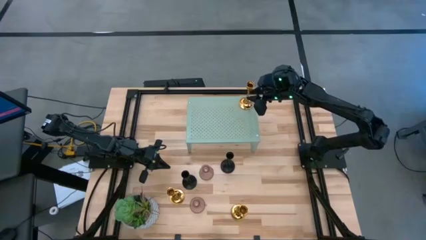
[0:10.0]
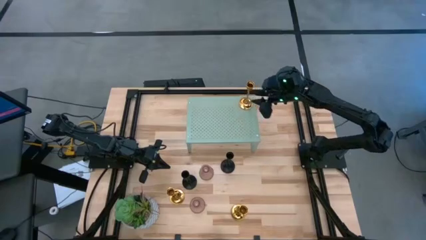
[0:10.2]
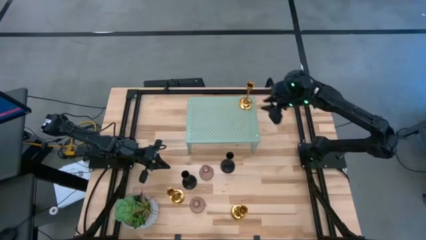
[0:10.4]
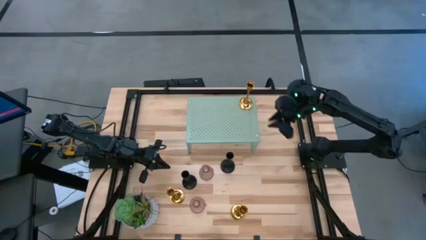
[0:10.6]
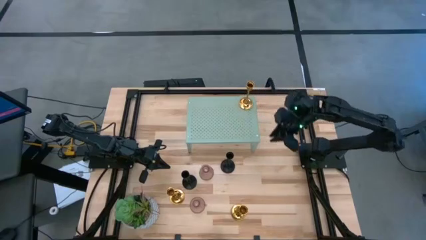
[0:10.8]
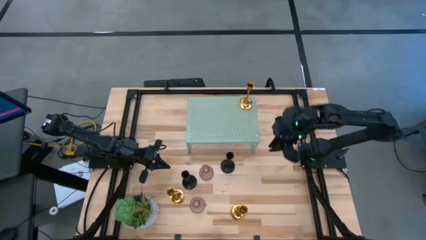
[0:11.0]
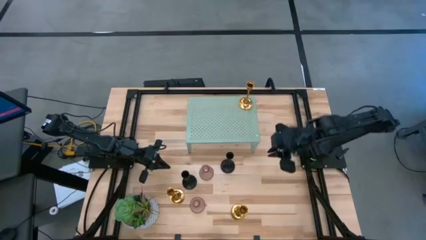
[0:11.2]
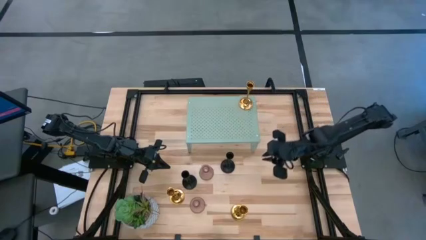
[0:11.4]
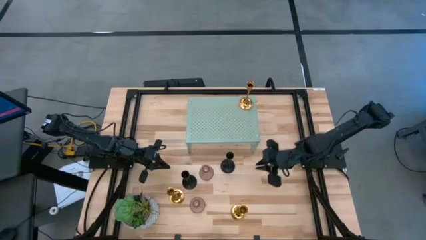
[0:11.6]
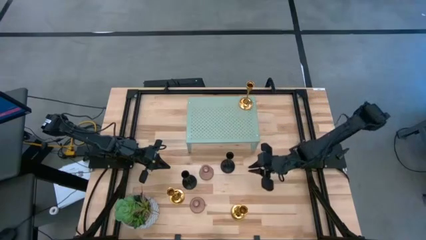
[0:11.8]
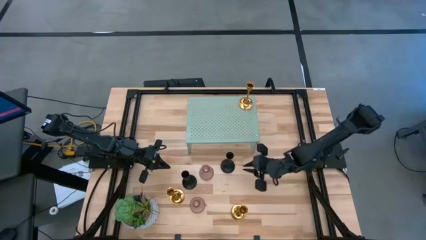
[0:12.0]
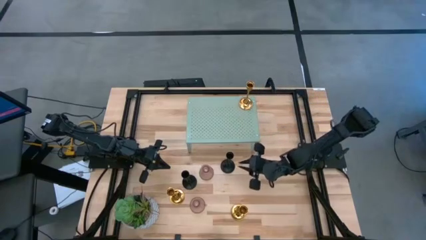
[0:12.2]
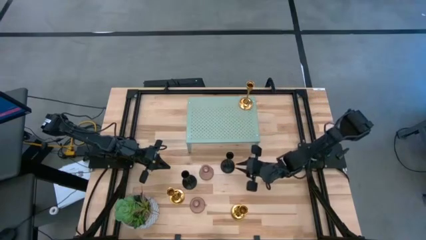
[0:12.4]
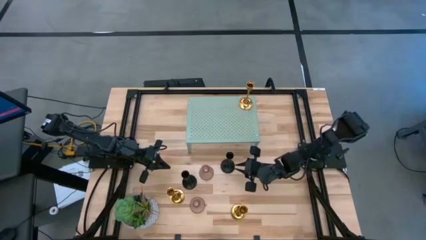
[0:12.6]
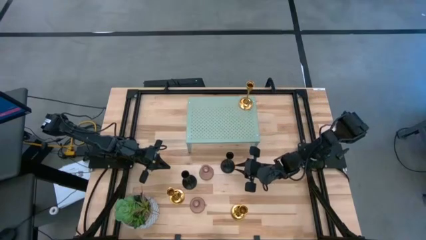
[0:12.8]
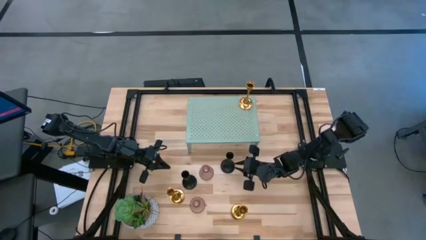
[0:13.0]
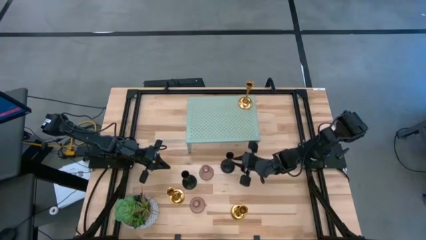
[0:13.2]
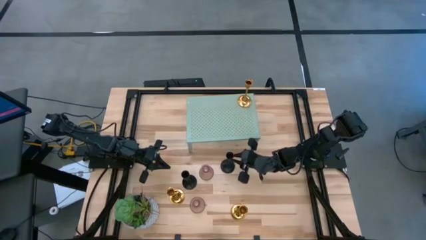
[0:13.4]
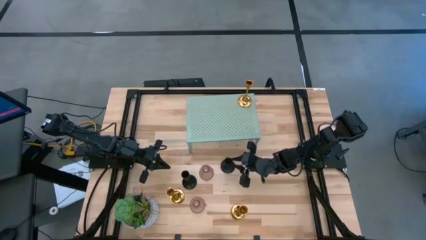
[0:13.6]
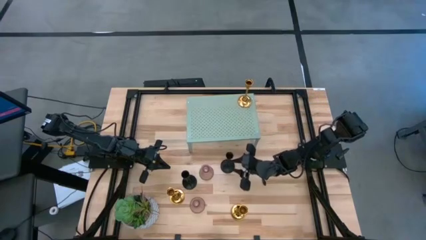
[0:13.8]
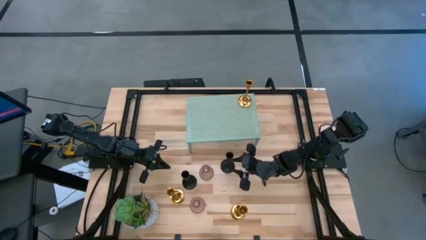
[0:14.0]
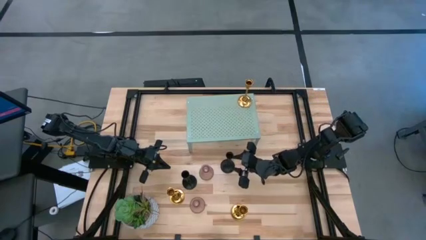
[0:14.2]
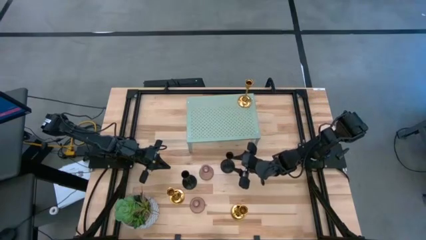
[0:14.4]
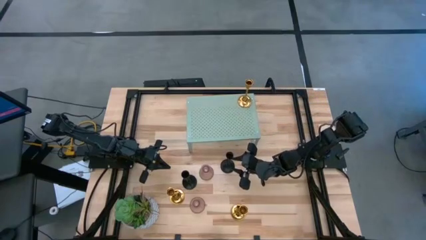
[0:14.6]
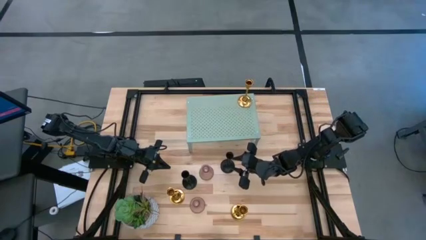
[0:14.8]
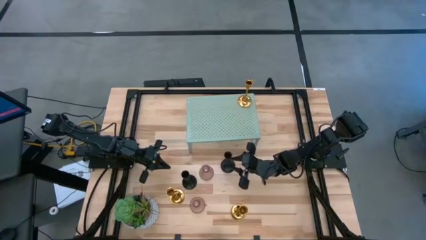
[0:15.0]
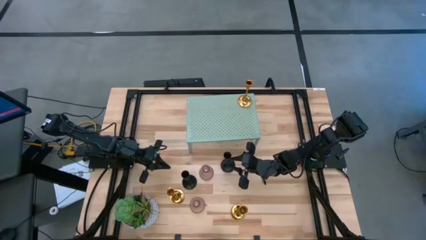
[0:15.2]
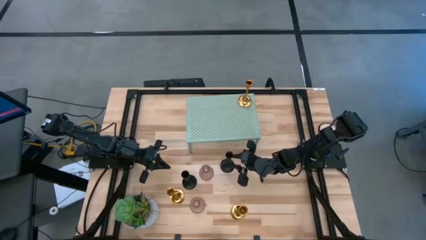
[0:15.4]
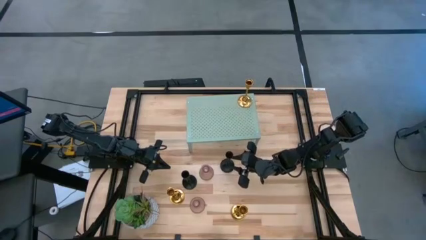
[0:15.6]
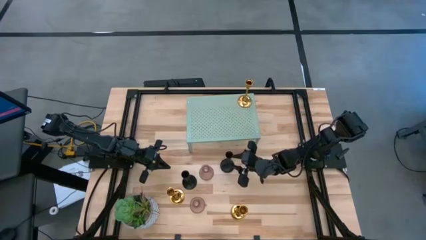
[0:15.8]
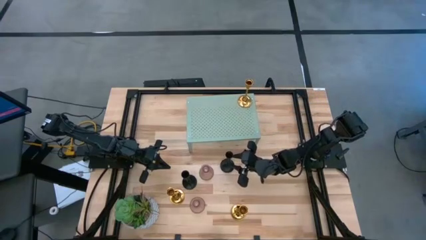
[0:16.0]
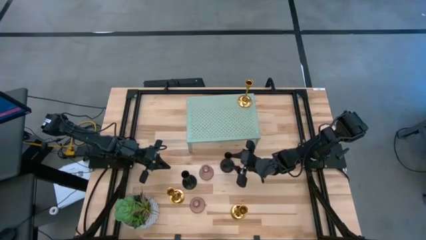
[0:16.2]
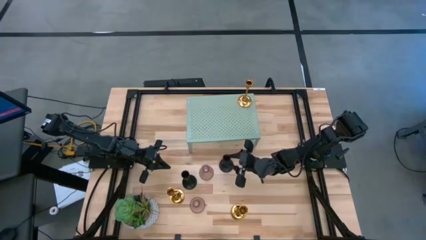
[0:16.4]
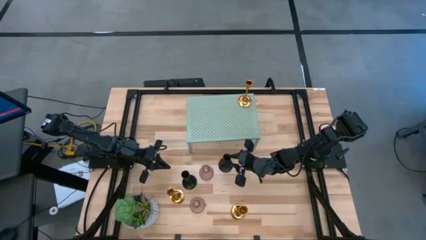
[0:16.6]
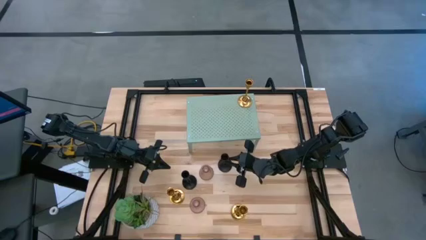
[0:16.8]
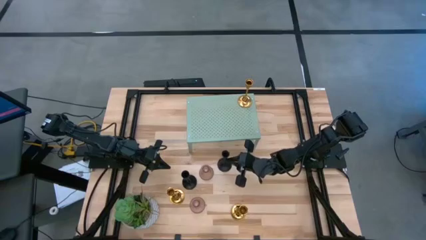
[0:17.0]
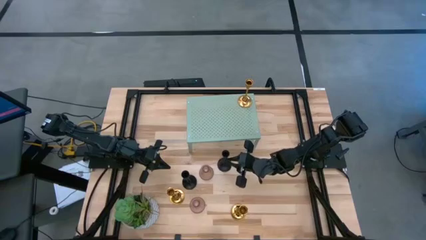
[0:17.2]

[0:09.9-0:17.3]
Task: Pick & Place candle stick holders
Put the top black candle holder on the shelf

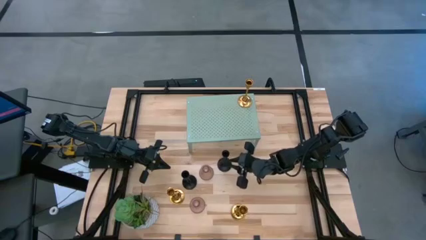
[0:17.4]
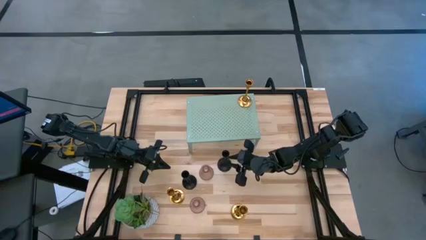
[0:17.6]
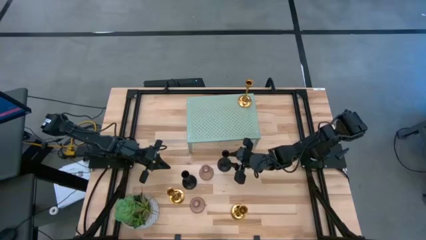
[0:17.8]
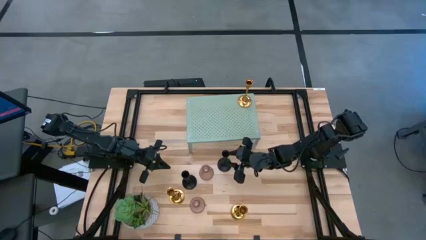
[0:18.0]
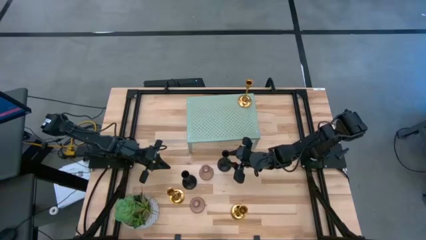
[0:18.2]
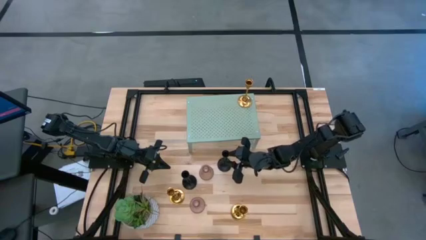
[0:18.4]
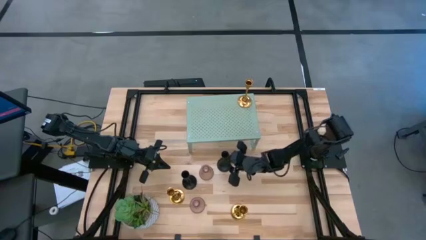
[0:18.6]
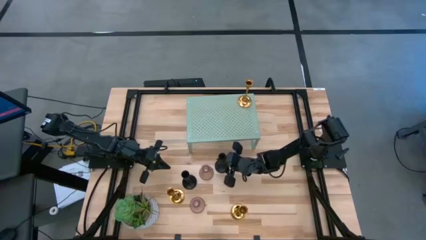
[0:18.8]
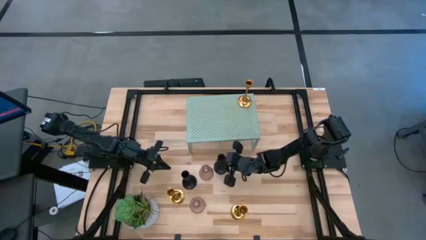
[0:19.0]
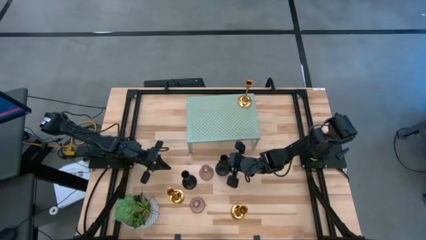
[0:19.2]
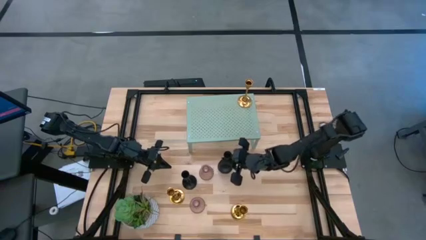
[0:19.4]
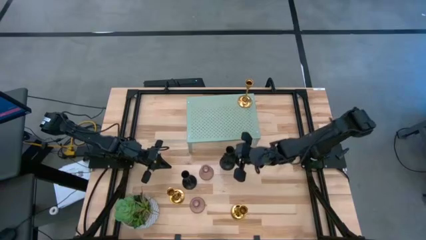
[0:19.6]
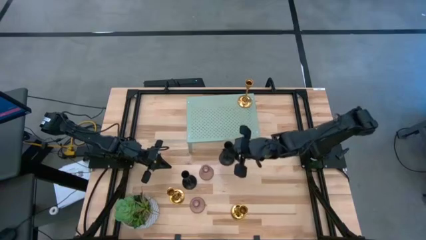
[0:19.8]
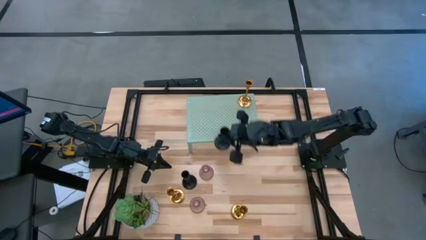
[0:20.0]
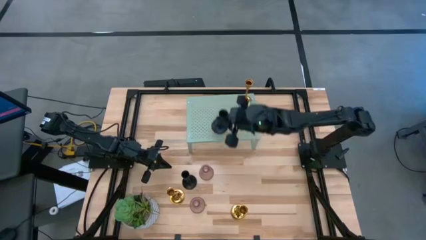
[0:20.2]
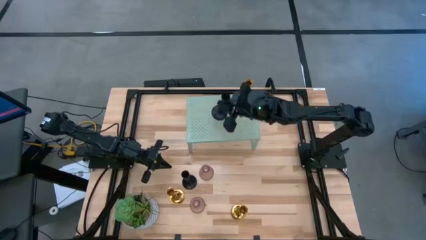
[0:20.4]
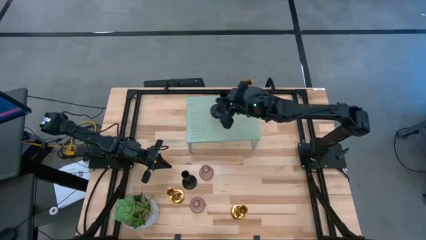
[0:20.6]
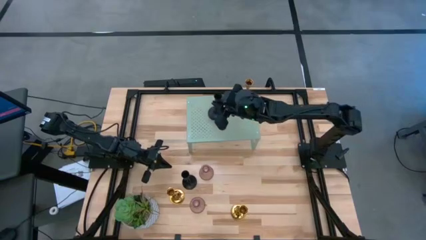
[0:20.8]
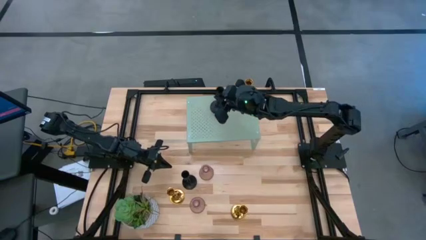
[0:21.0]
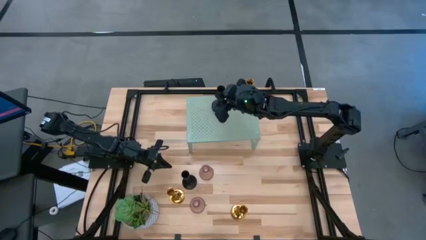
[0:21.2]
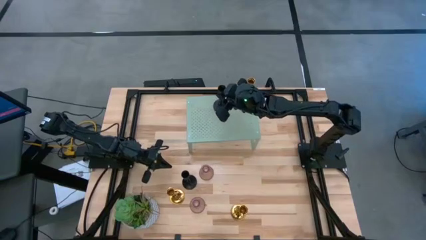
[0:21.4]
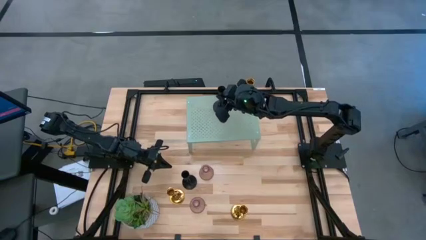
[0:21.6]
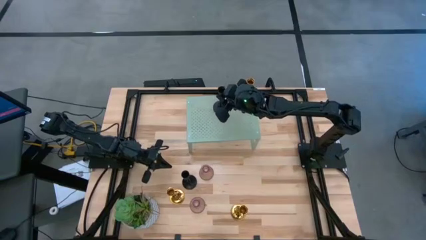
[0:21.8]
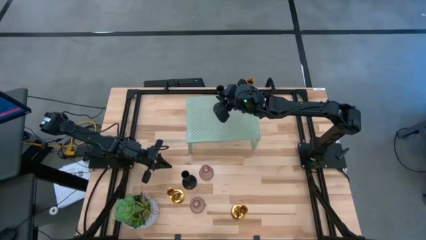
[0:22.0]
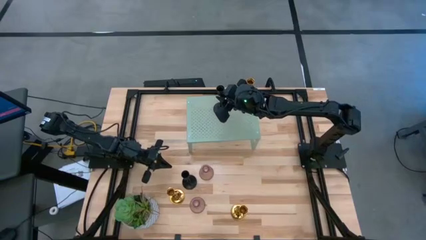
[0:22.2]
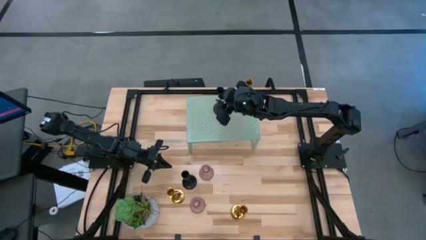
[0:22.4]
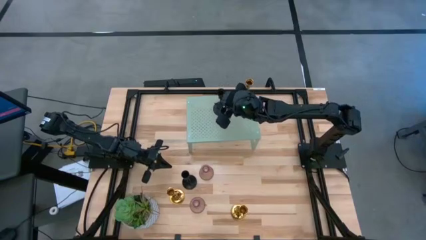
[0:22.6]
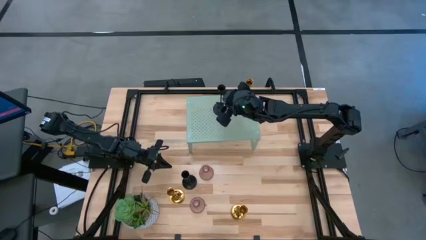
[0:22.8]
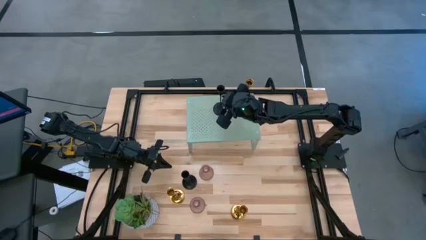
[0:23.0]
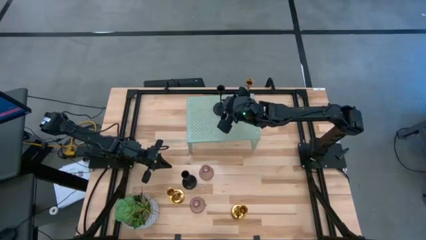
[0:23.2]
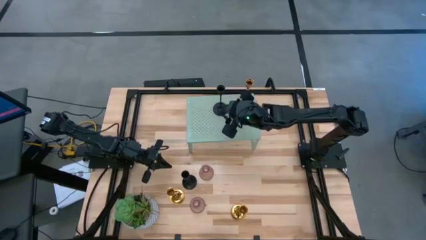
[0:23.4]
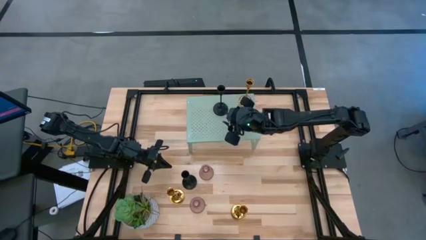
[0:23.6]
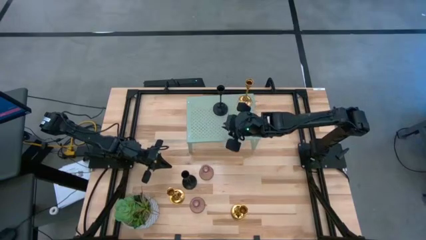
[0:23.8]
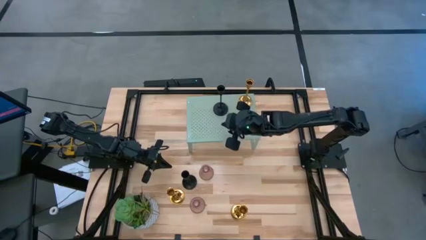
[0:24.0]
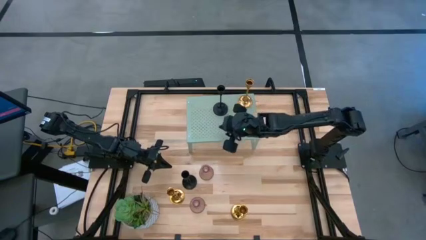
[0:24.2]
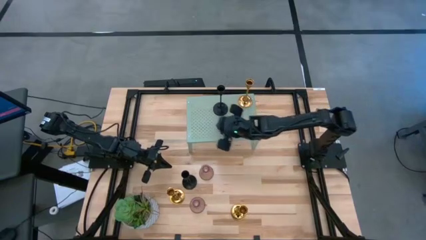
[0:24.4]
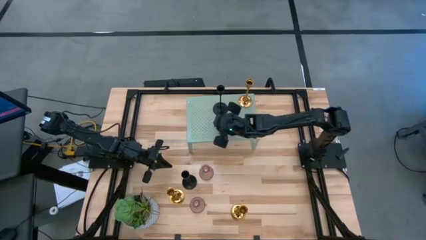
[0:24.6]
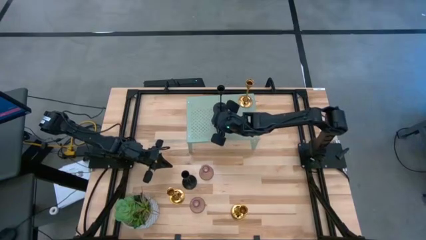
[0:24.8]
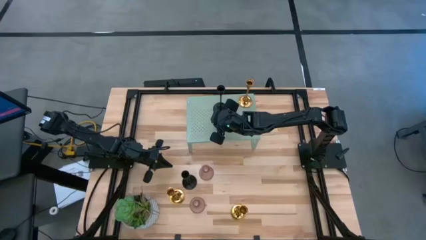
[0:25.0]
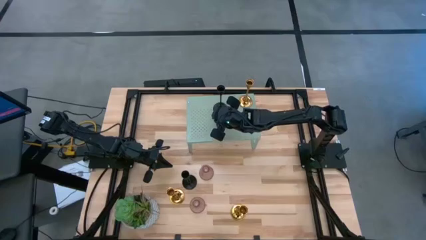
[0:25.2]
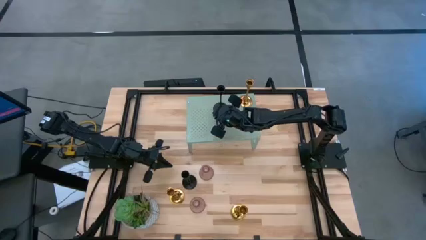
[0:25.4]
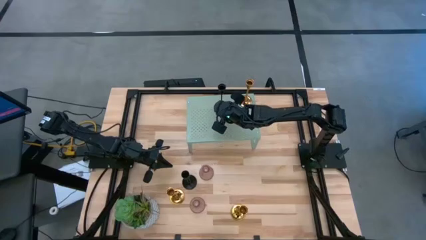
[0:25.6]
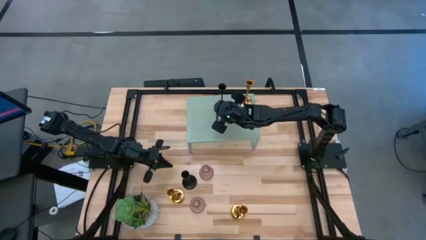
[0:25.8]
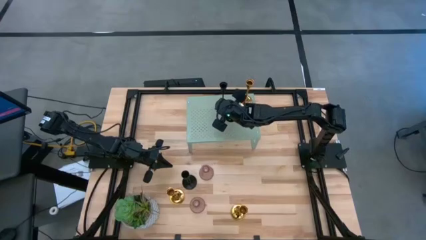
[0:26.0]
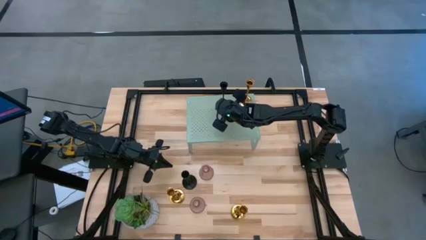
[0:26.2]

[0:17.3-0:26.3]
Put the top black candle holder on the shelf
